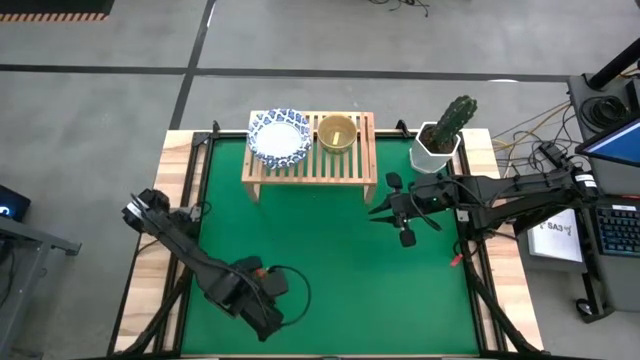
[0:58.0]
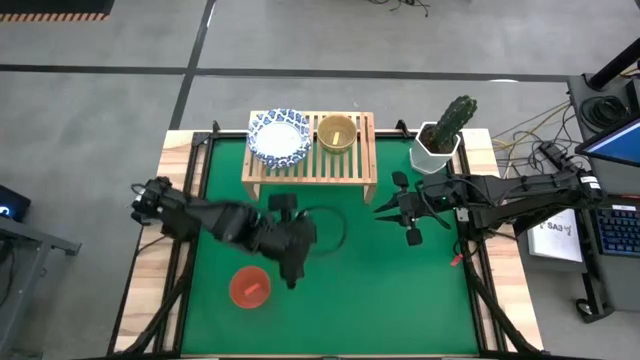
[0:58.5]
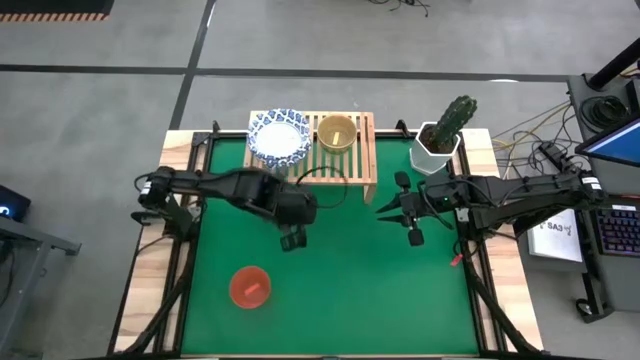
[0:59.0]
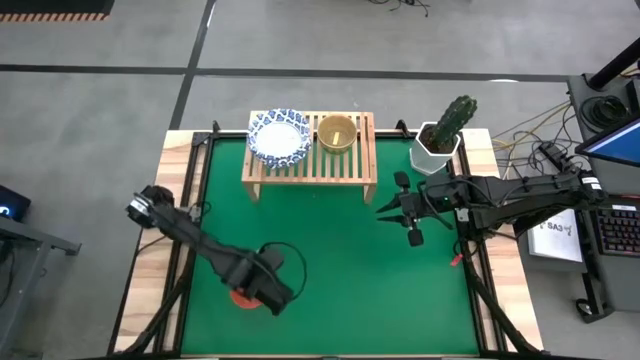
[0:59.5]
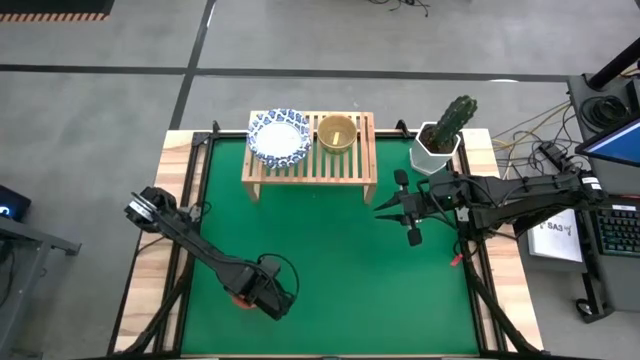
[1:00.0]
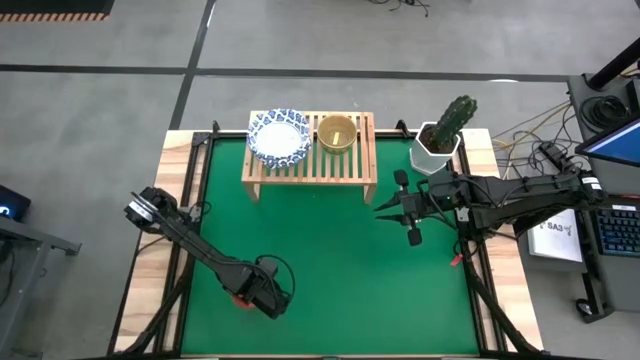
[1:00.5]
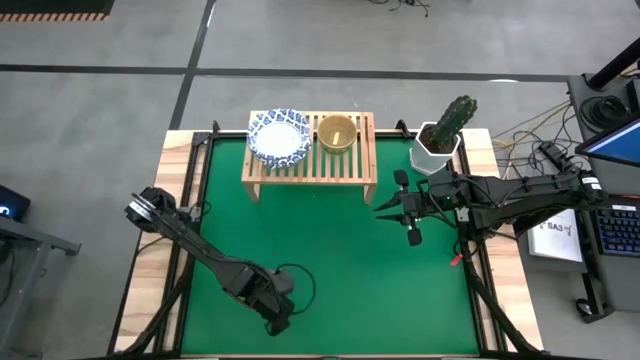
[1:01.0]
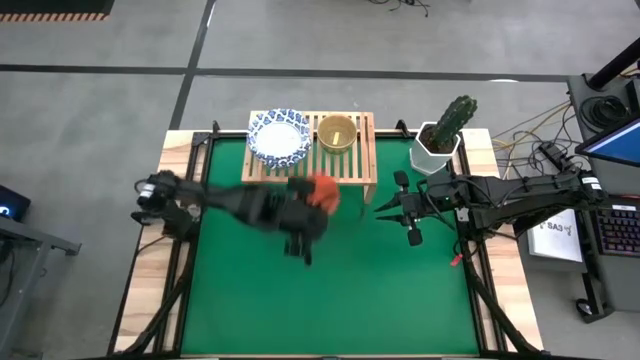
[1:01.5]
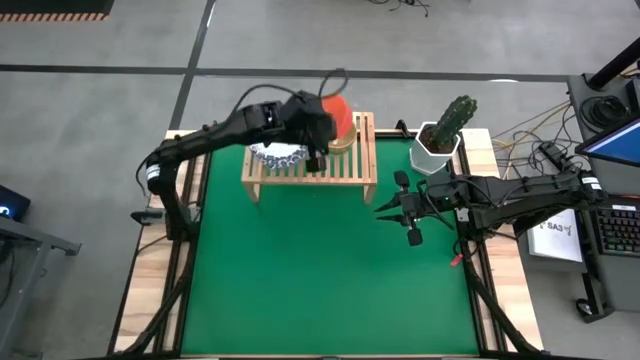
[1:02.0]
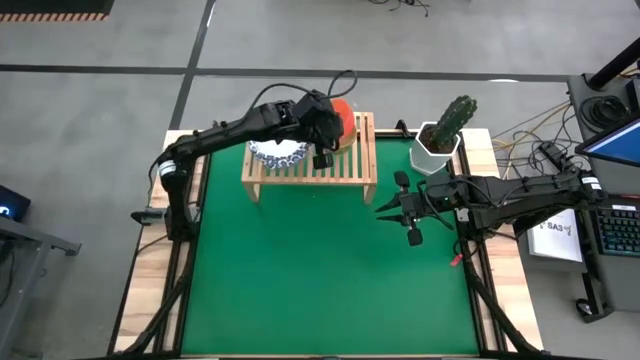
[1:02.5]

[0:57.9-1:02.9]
Task: Place and stack bowls onto a shelf
Stack the orange bowl on top of the yellow bowl on the shelf

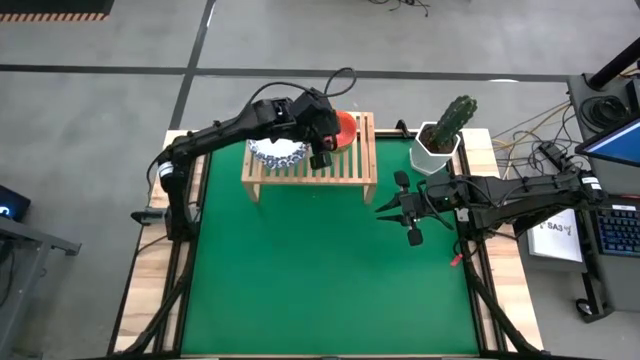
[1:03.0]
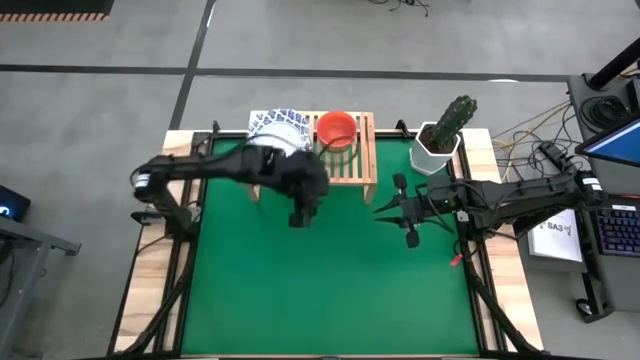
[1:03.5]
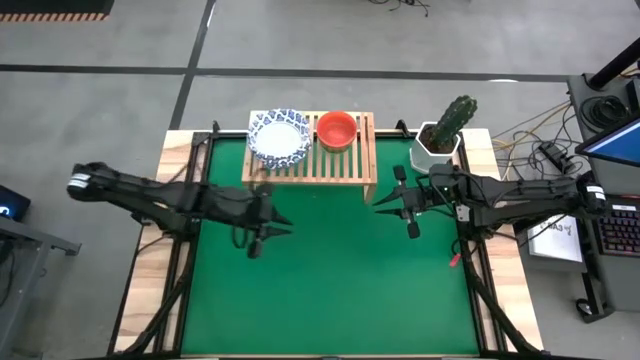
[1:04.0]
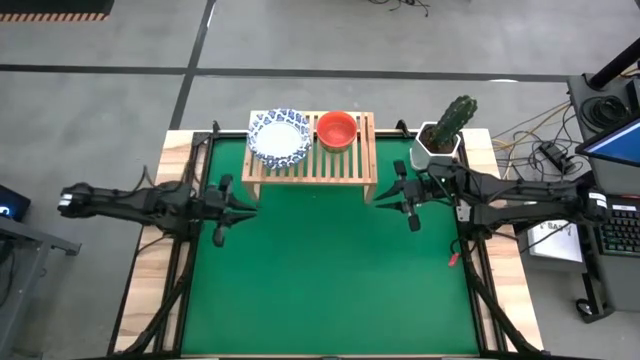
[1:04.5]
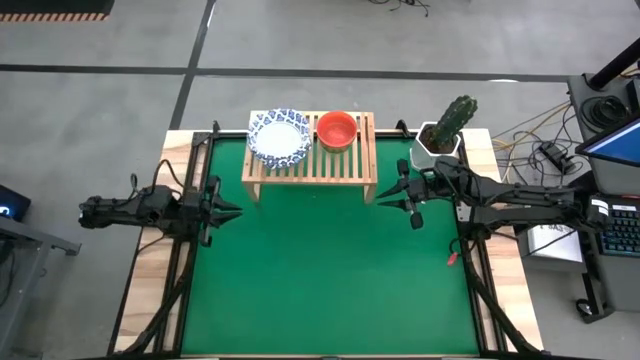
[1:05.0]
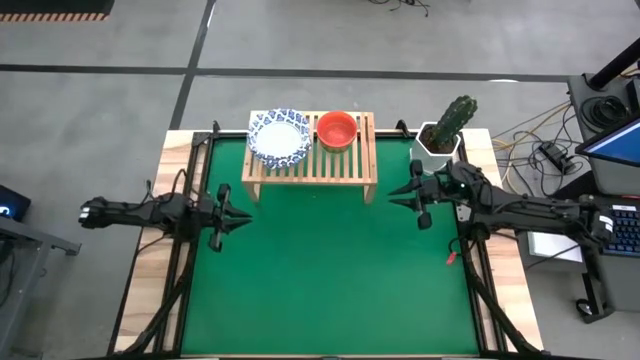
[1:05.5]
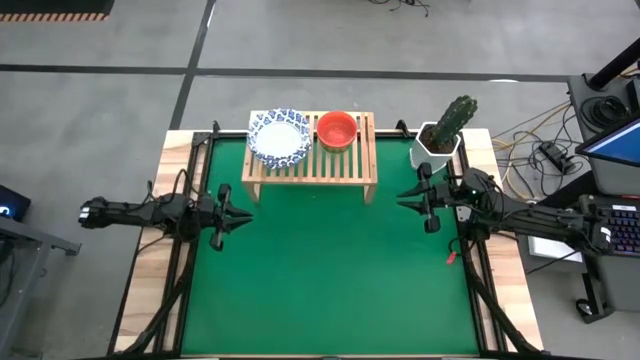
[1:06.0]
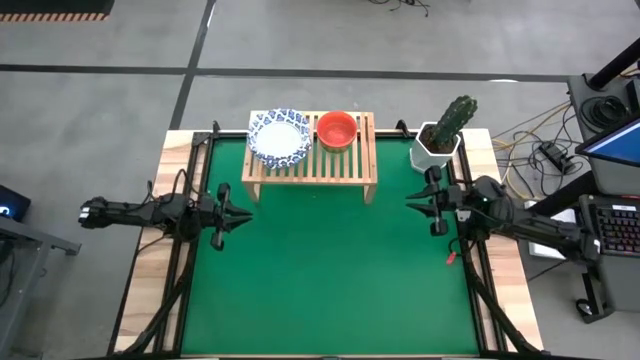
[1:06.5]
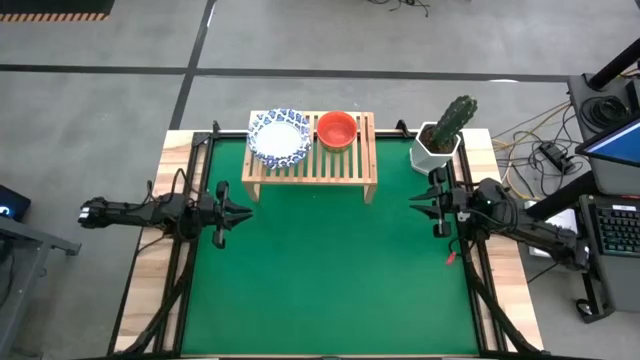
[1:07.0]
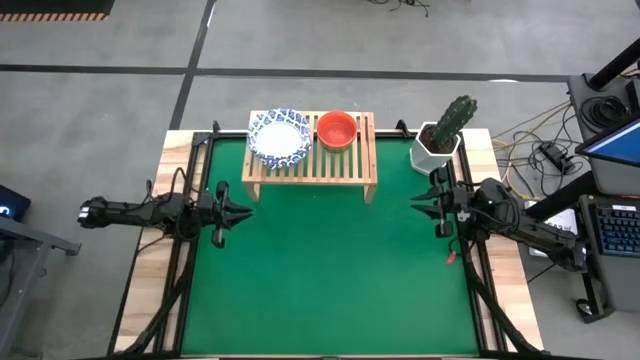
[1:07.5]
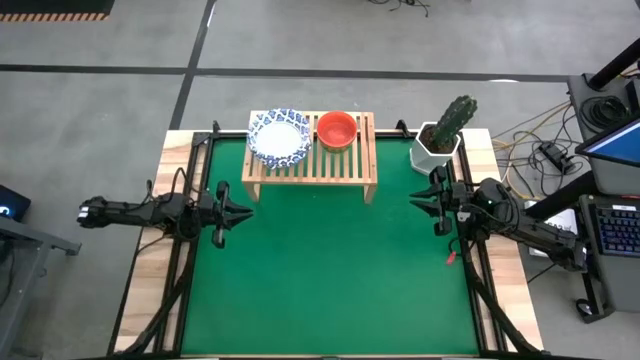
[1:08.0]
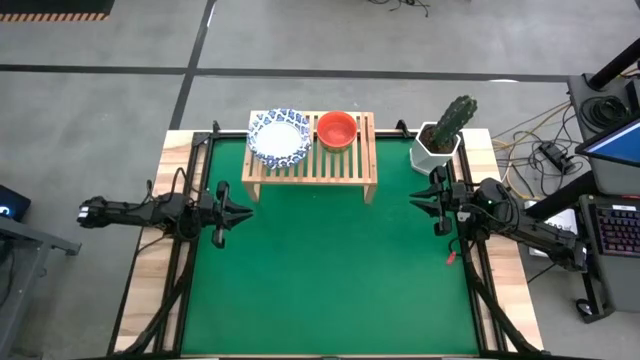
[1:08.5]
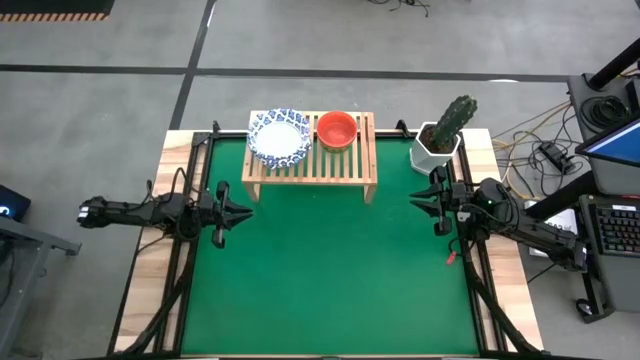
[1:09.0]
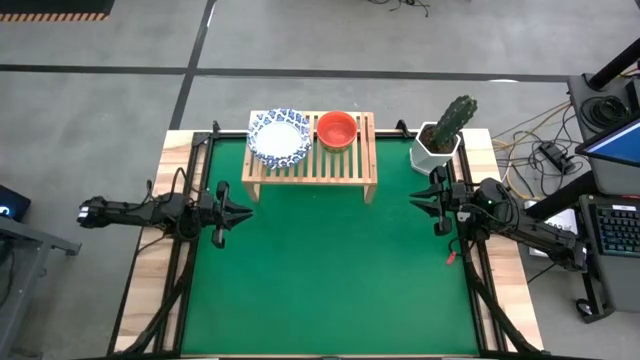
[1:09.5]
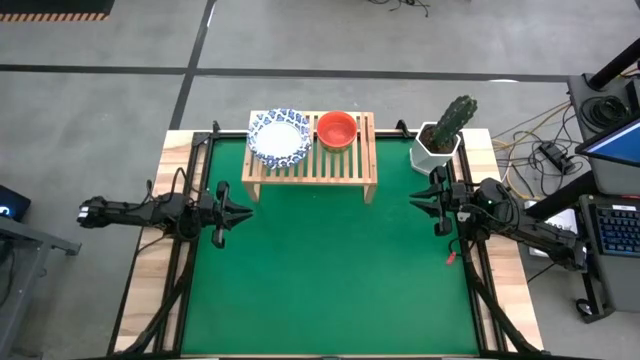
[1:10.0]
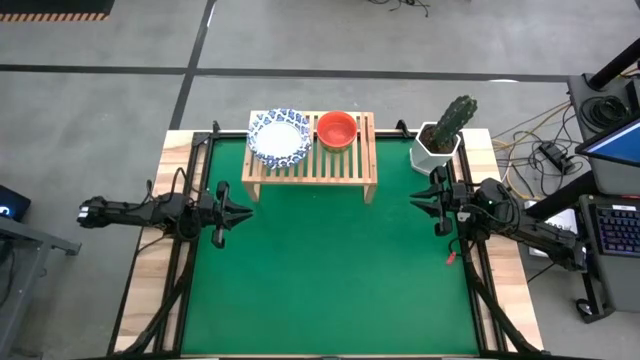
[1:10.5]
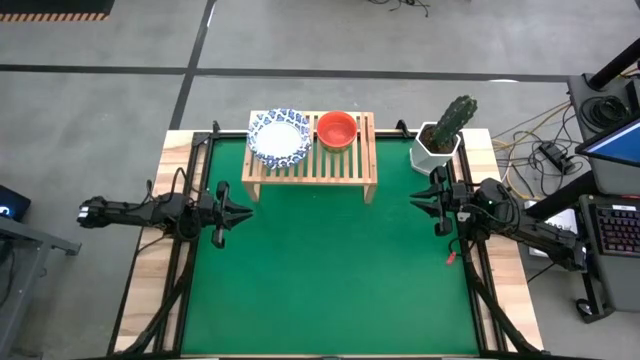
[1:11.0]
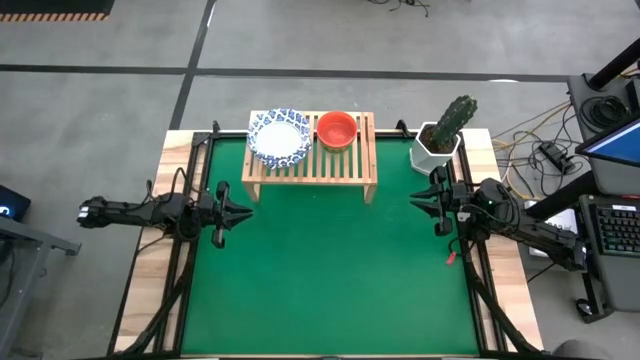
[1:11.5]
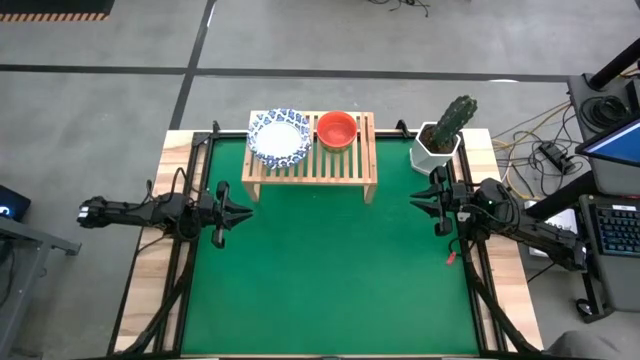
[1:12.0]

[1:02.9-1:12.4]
Return to Home Position

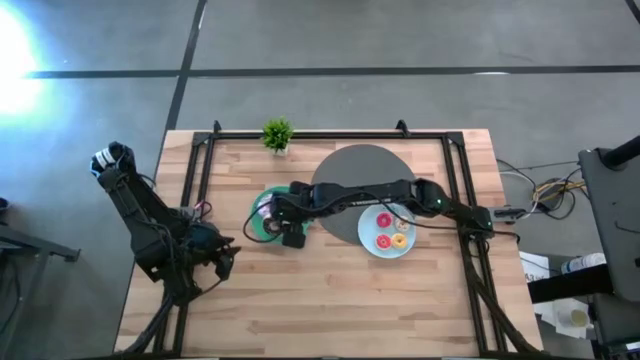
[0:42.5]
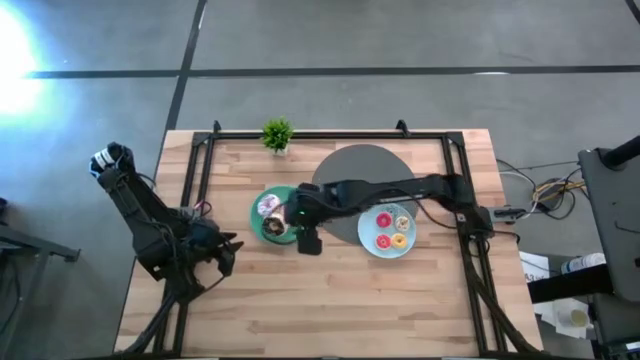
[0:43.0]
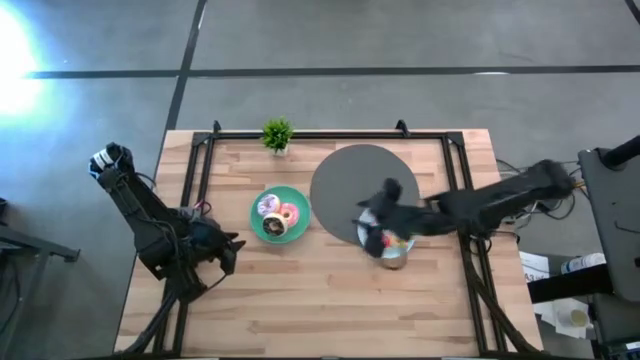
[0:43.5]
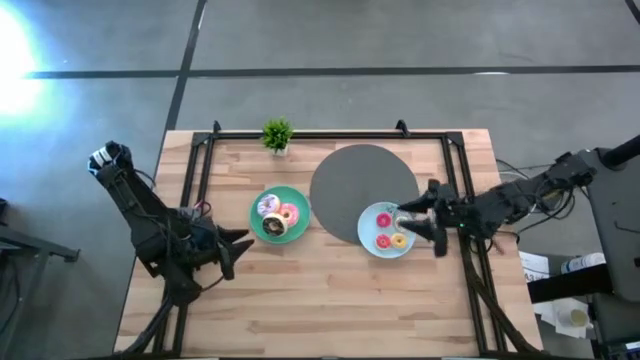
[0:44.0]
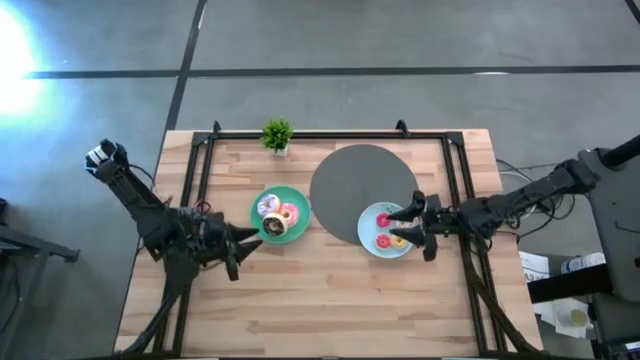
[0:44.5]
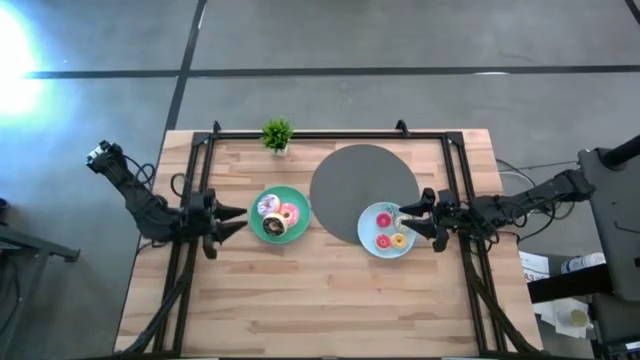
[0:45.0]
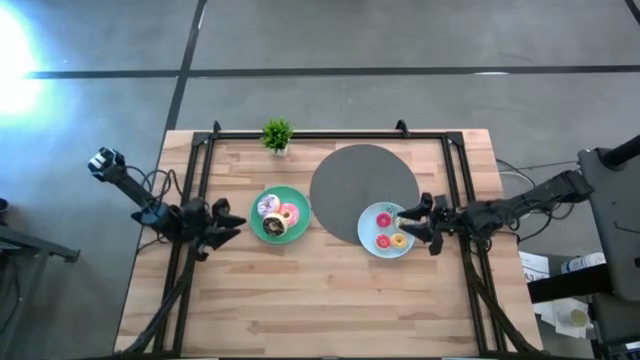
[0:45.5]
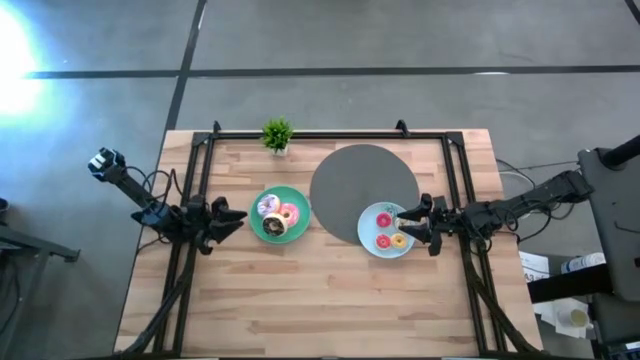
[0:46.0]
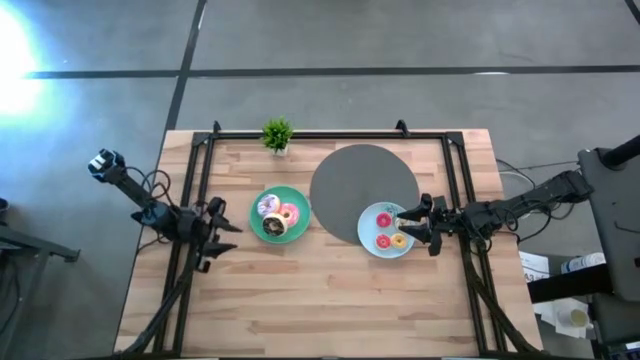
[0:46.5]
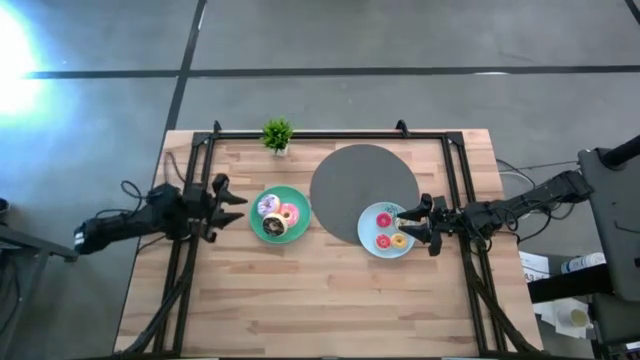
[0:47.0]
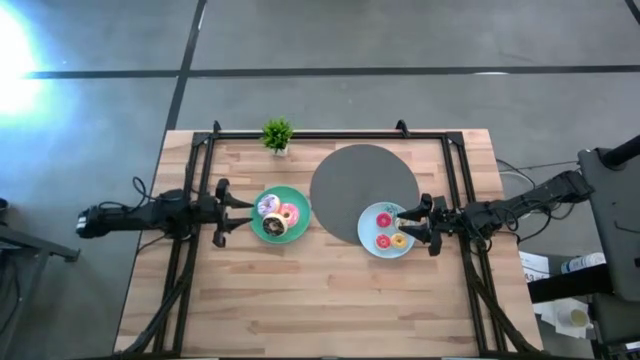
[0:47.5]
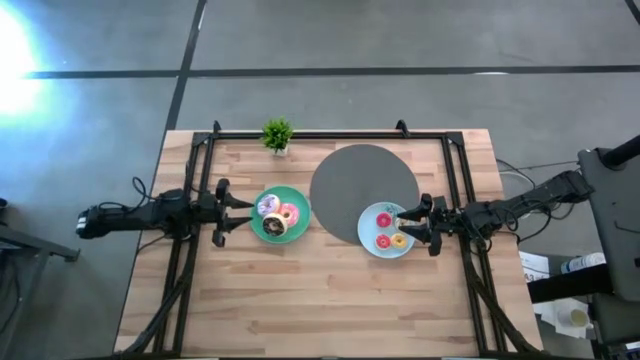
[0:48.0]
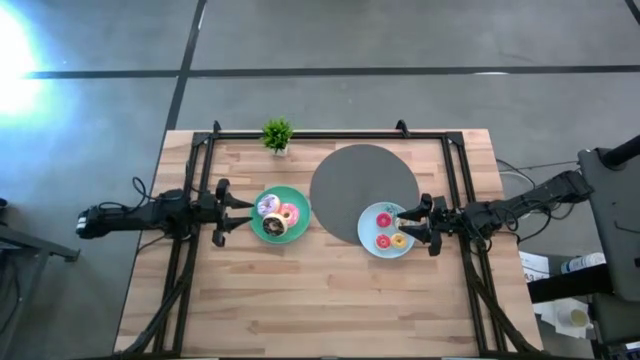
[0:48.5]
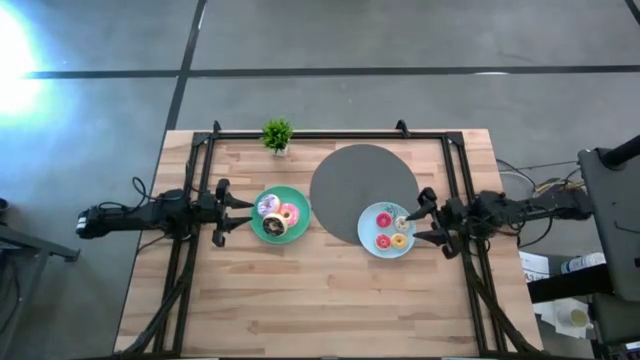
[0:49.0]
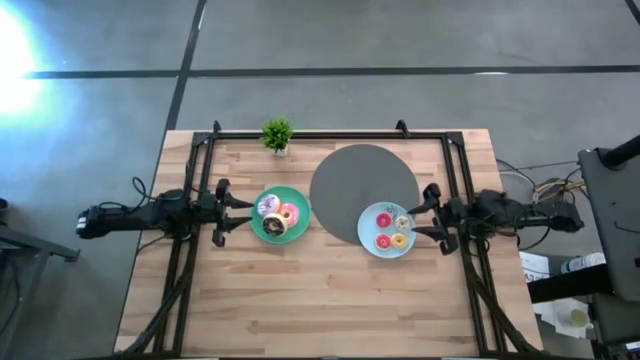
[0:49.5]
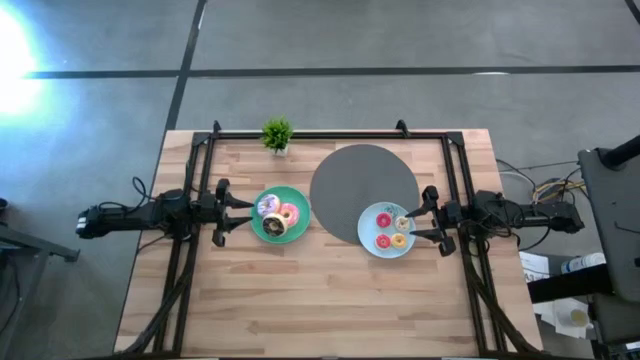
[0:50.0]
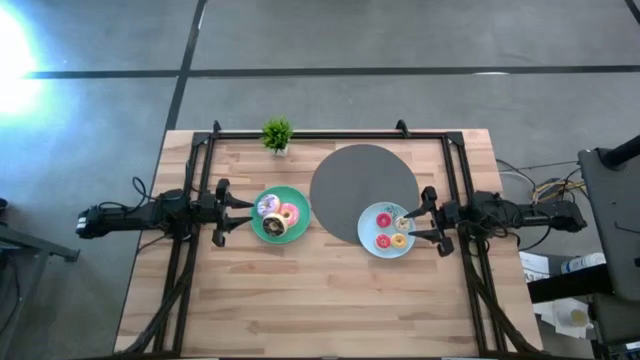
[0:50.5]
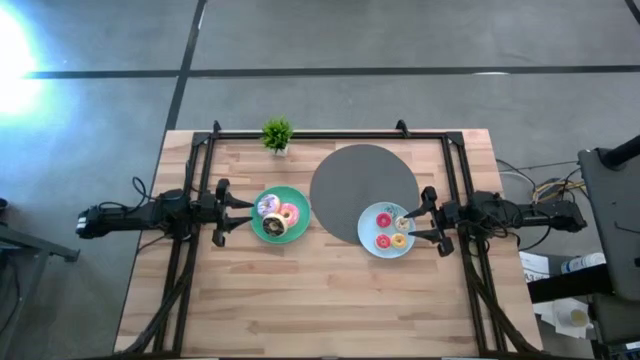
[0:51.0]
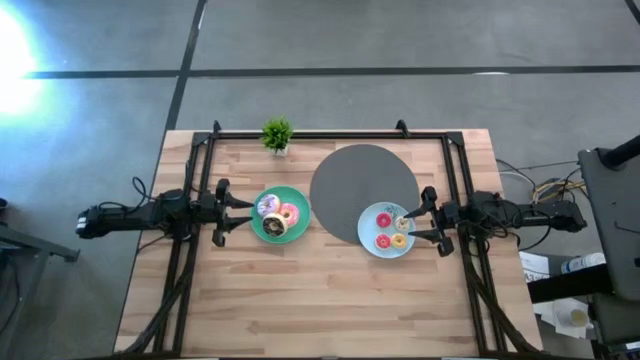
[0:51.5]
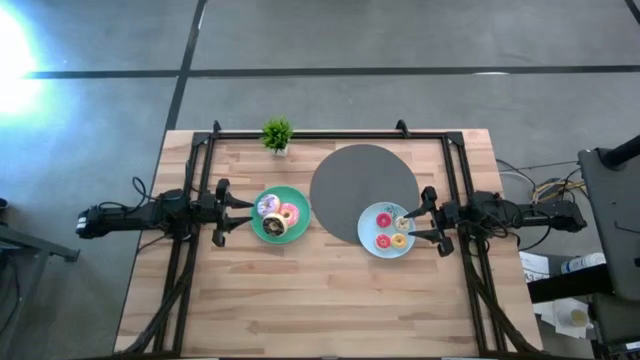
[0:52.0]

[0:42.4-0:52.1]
Task: Pick & Place donuts
Return to Home Position
